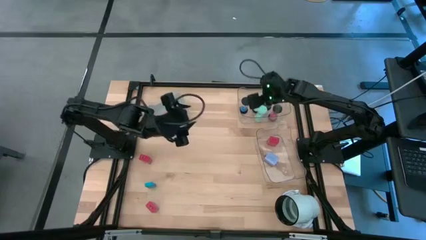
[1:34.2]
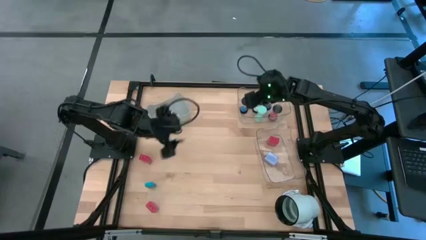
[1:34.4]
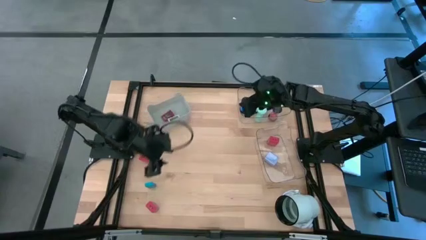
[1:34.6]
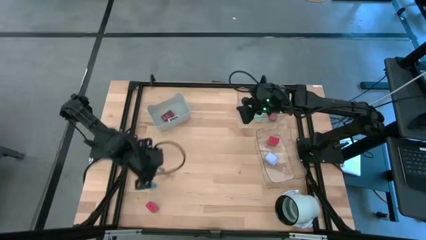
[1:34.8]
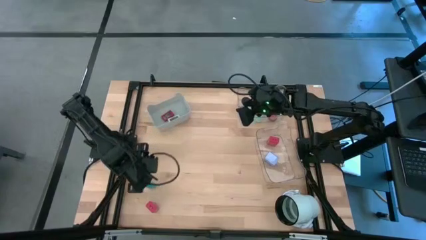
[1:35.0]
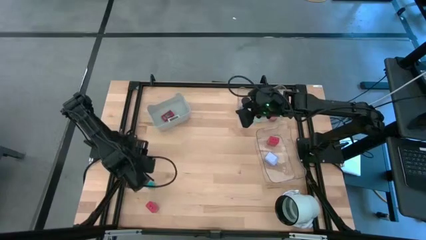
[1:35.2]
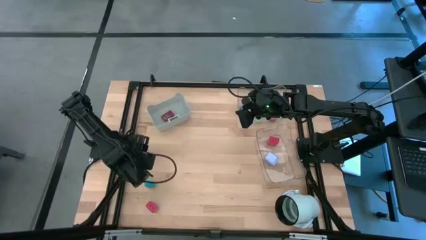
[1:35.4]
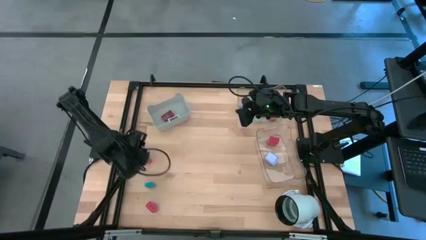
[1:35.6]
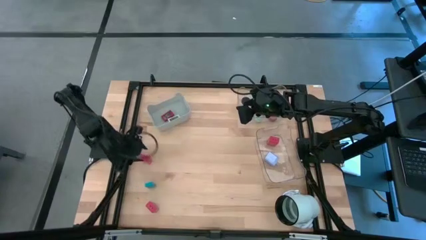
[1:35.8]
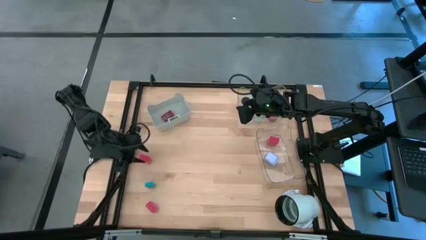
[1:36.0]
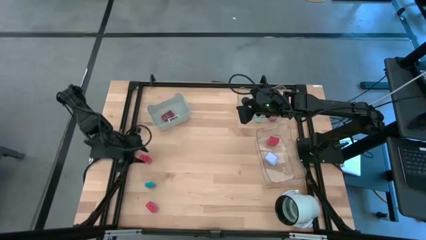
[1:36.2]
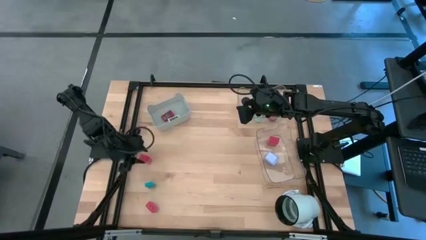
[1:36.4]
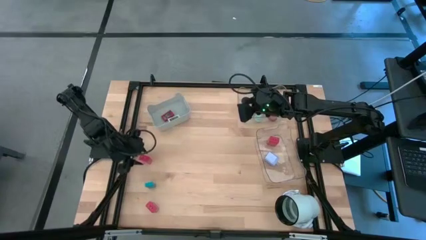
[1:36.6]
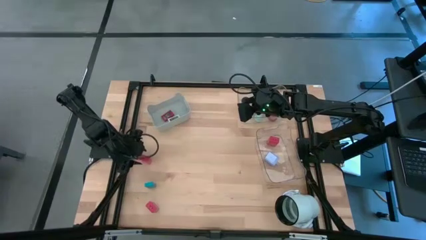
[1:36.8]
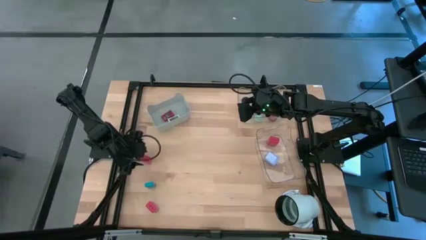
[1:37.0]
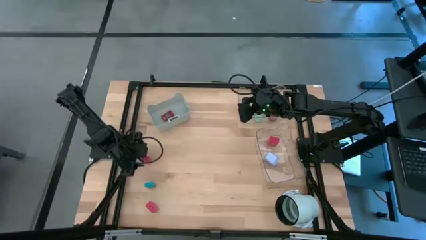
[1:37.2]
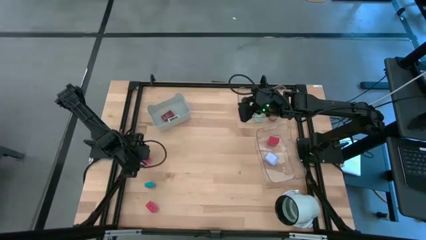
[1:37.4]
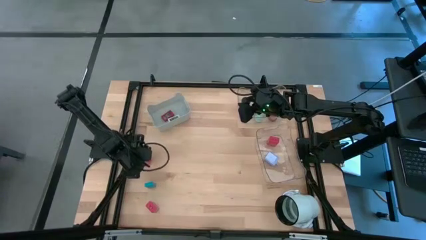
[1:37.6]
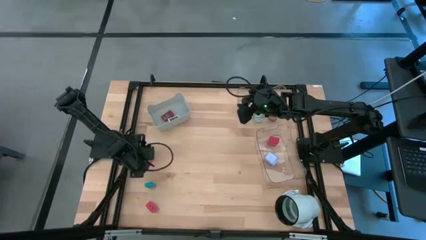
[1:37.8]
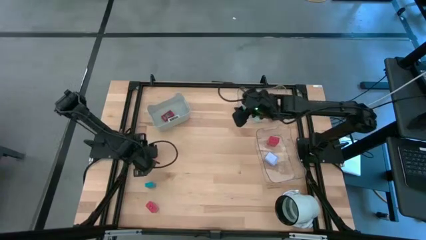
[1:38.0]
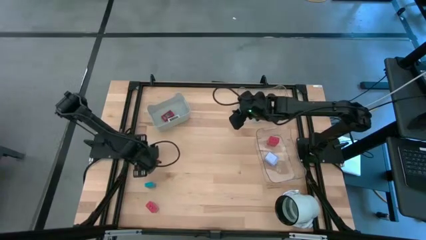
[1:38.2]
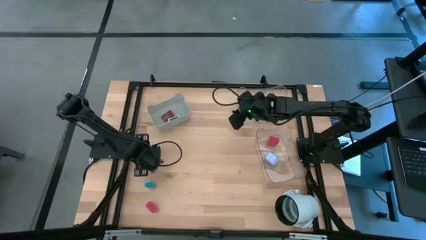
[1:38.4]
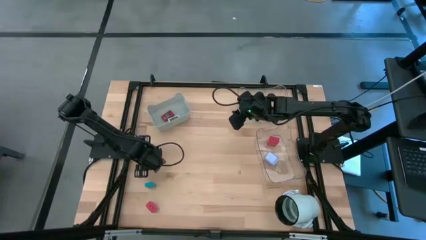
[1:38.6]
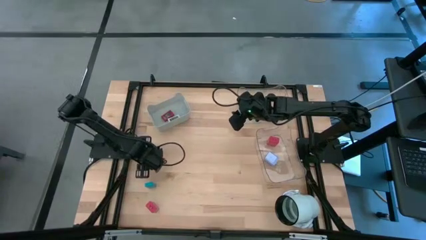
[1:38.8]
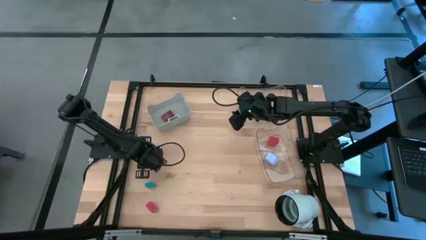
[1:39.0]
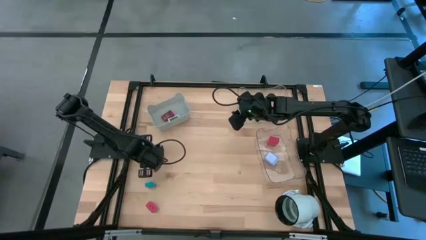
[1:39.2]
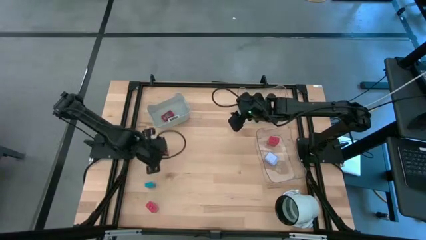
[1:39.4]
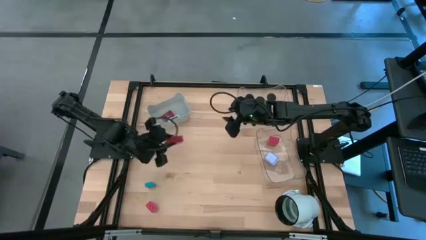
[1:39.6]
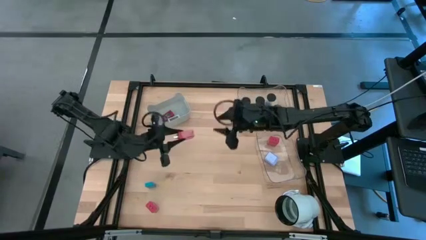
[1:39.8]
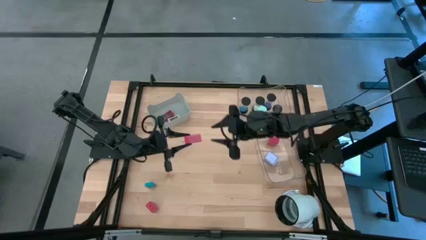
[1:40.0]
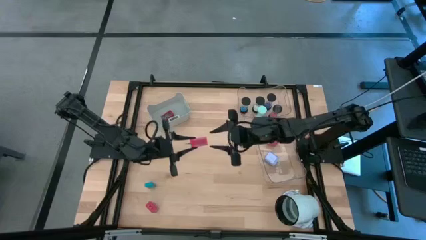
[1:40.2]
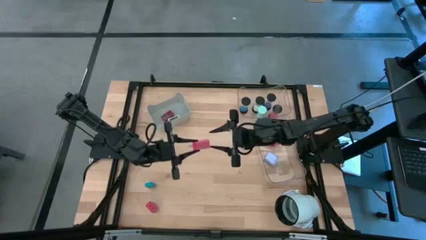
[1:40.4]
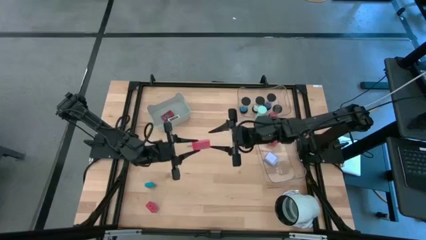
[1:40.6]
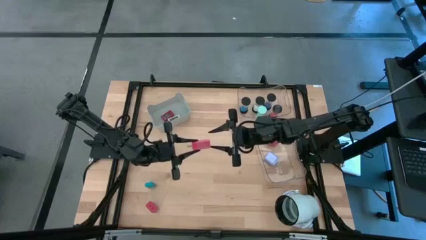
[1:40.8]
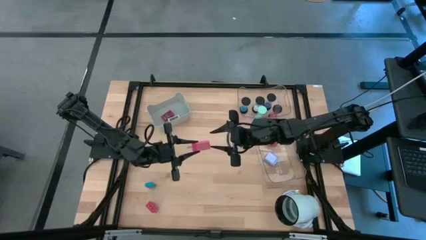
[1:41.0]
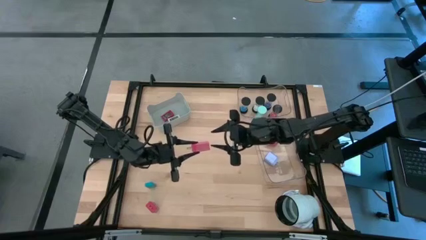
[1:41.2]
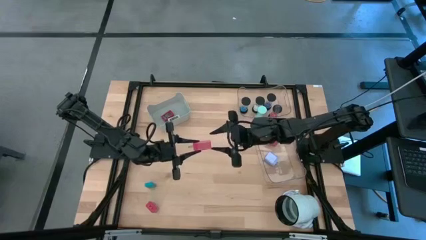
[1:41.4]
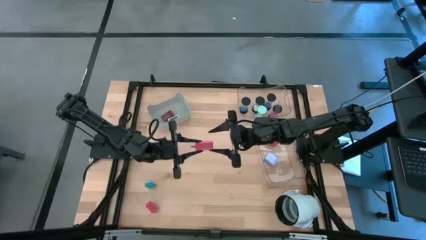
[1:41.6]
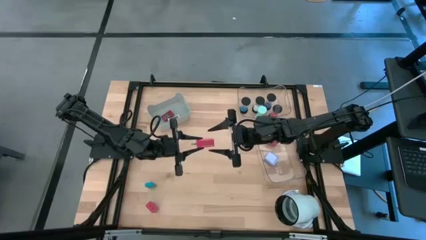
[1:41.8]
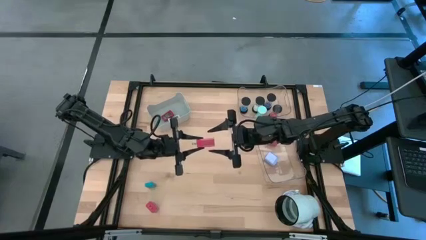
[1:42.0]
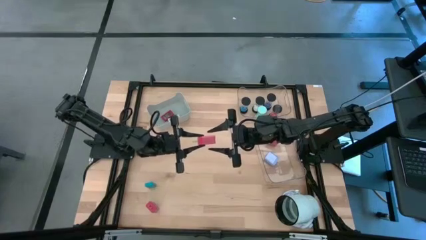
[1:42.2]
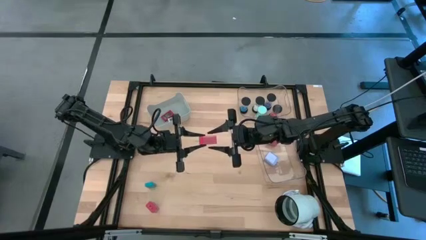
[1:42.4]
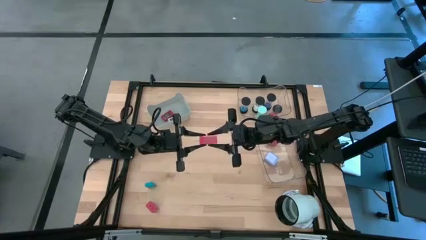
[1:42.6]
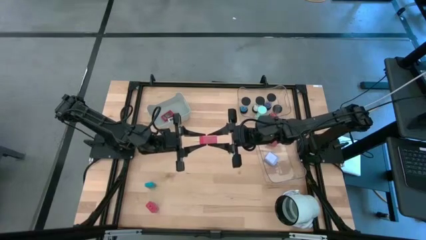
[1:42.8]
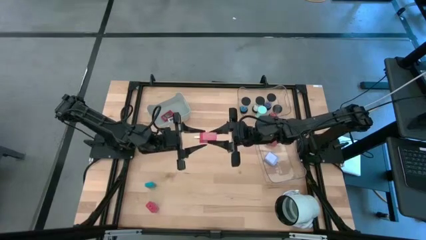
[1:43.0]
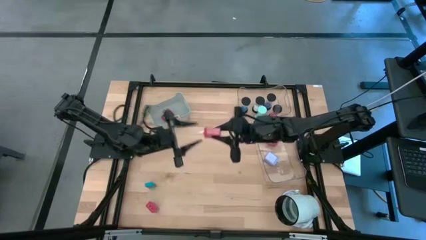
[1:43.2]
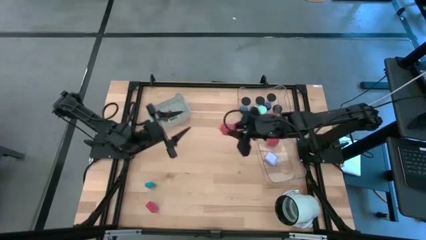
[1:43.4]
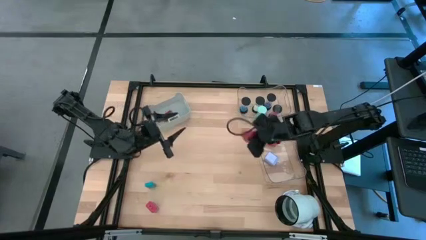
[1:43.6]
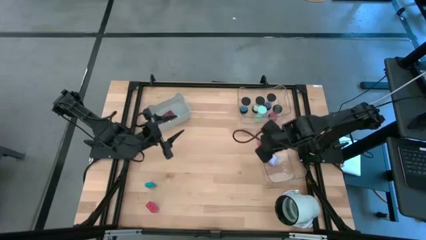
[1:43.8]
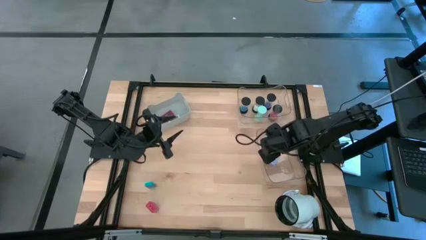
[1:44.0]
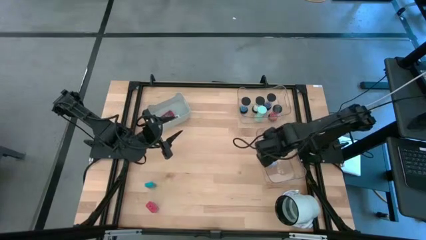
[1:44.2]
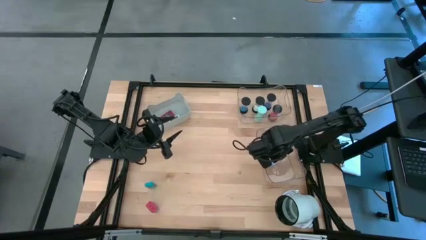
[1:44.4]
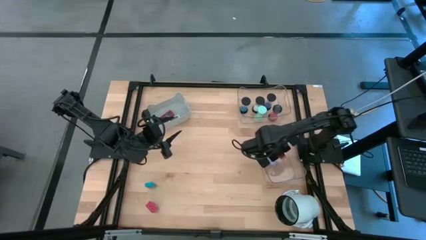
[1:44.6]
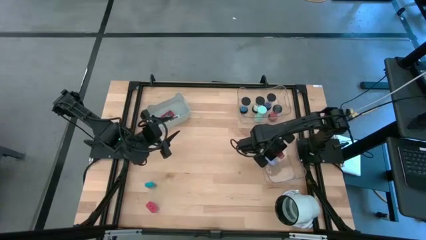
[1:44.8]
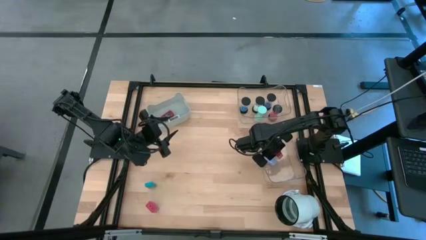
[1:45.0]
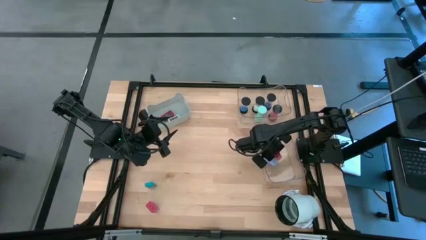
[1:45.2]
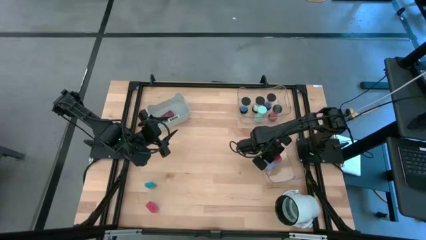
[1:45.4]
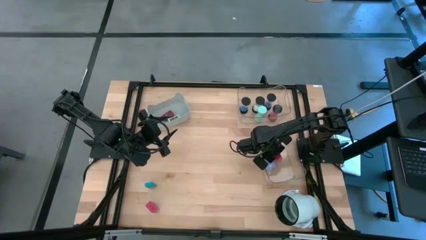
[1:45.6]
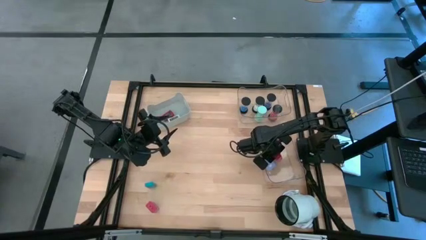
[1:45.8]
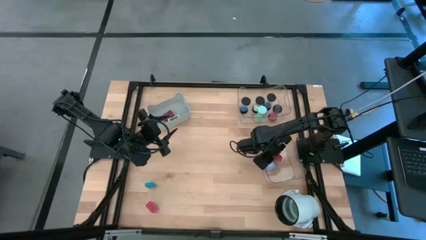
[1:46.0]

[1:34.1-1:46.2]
Task: Pick & Place Office items
Put the top red charger adapter into the bottom transparent bin

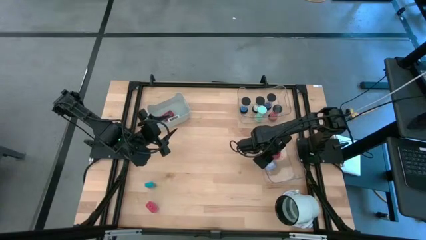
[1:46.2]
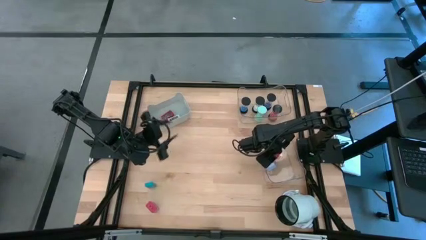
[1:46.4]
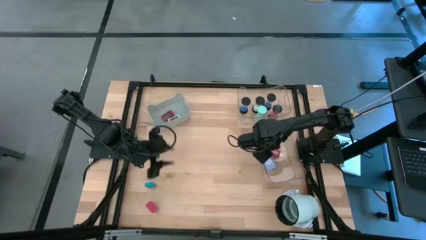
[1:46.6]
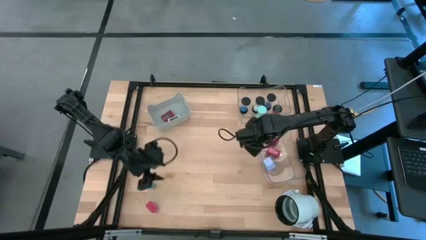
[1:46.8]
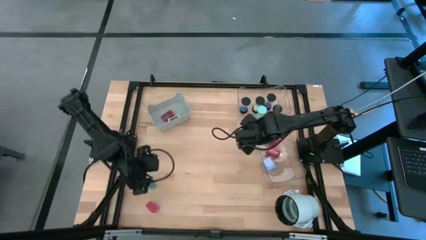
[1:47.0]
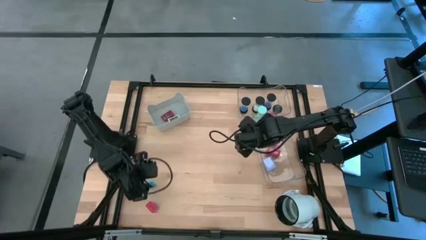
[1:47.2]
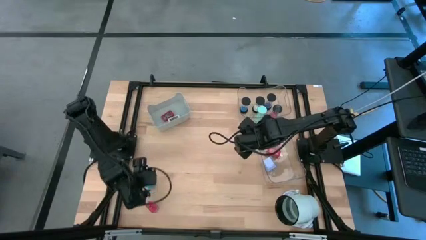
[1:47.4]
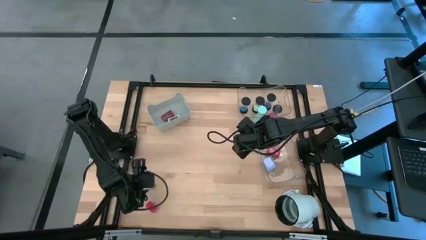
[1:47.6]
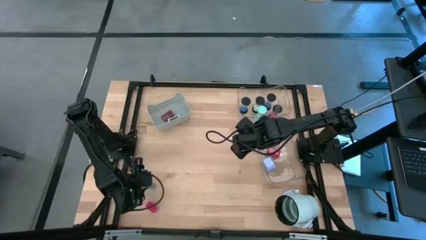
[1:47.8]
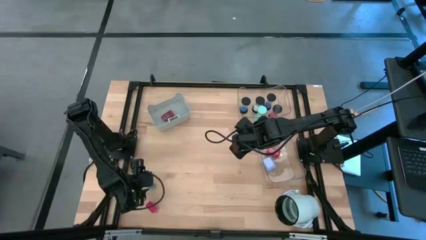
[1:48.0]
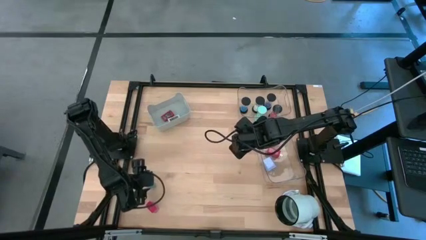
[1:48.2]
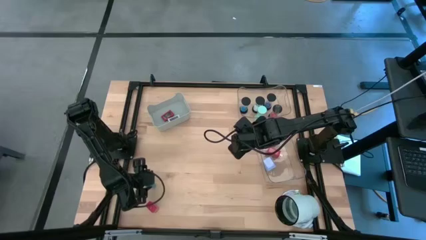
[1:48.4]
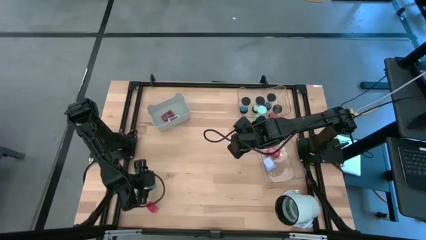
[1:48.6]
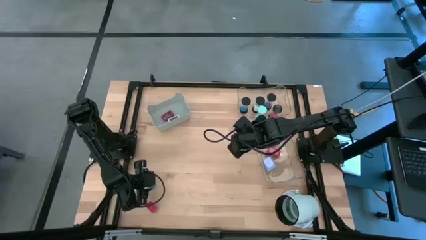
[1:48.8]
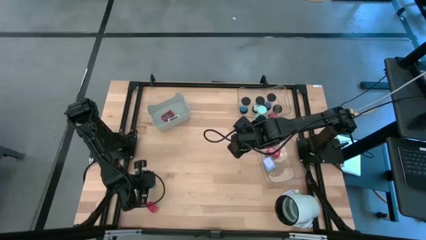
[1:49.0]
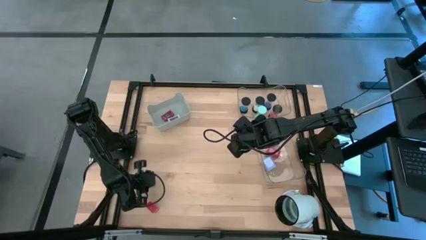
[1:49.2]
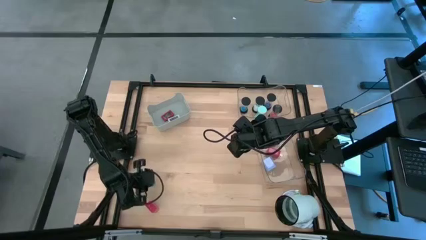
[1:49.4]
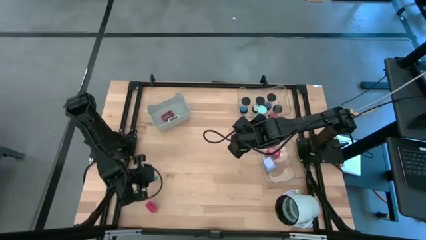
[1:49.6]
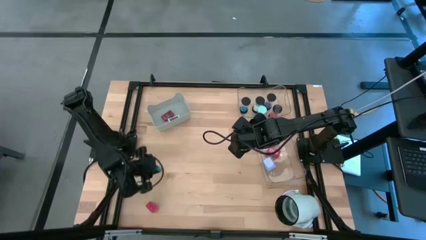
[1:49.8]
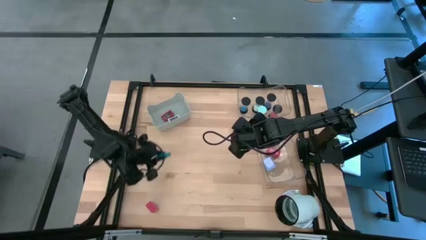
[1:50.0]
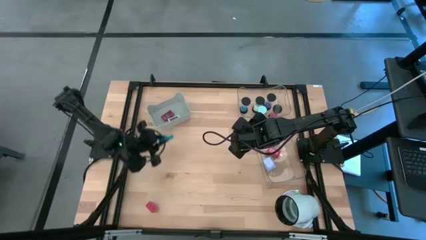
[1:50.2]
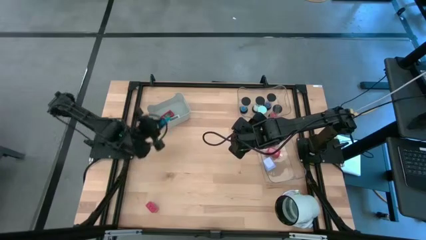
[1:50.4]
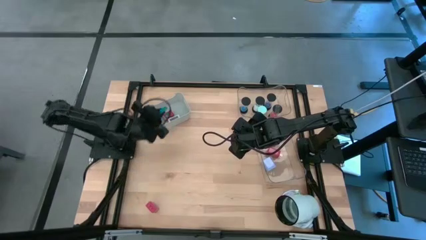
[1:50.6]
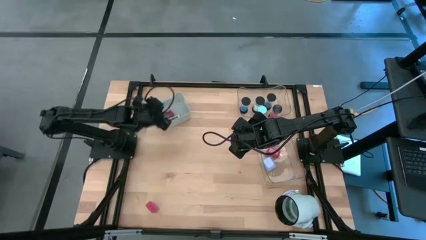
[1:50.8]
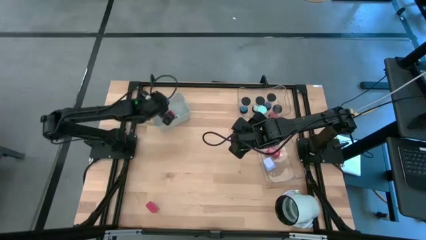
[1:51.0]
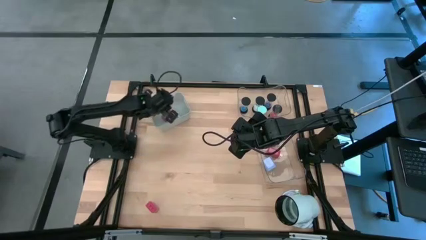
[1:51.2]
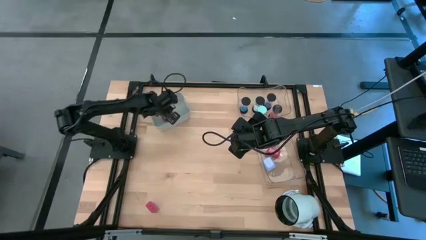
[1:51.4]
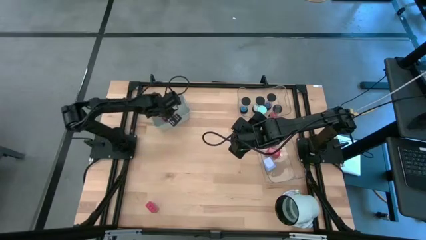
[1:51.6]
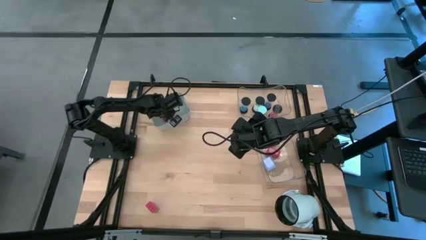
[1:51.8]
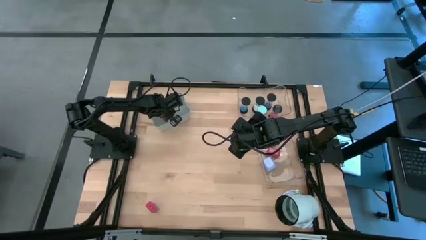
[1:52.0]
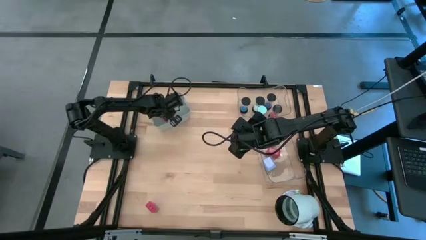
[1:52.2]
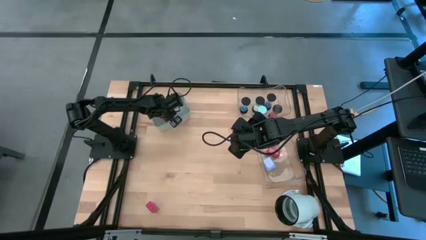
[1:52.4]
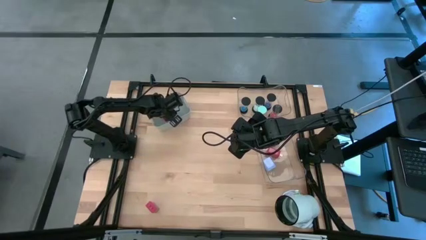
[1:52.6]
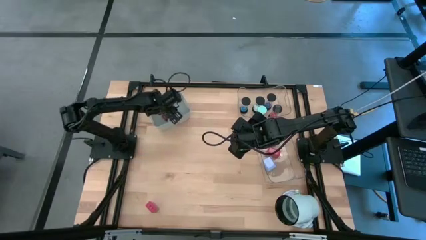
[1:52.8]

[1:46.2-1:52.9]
Put the blue digital clock into the gray bin
